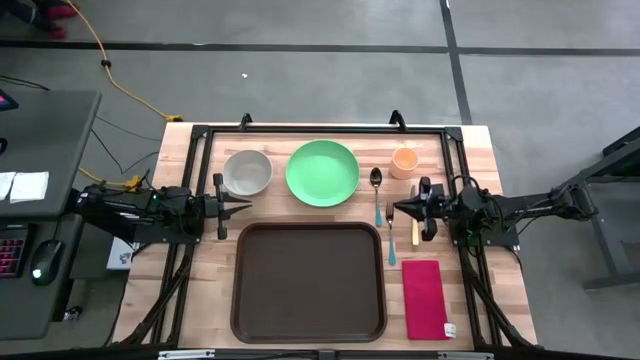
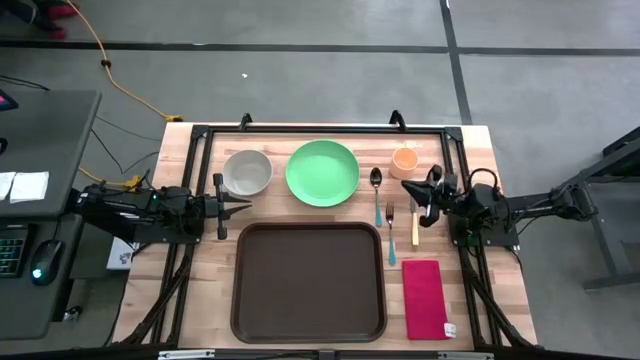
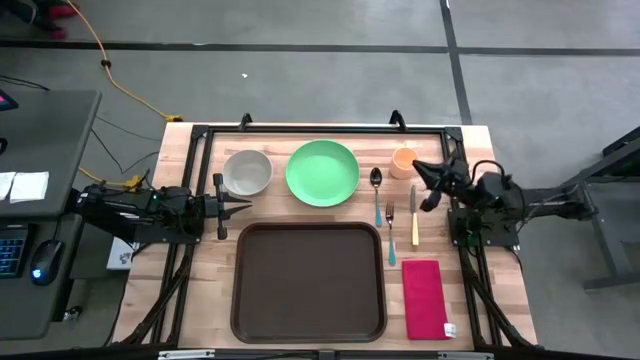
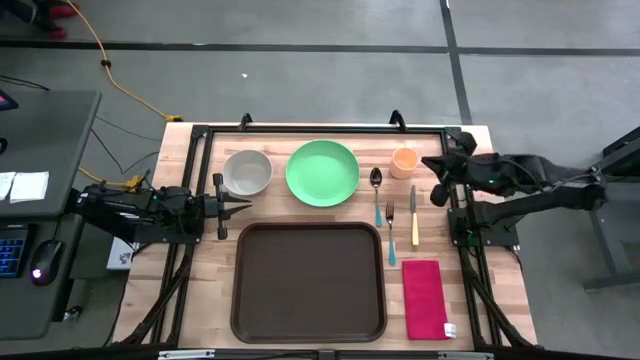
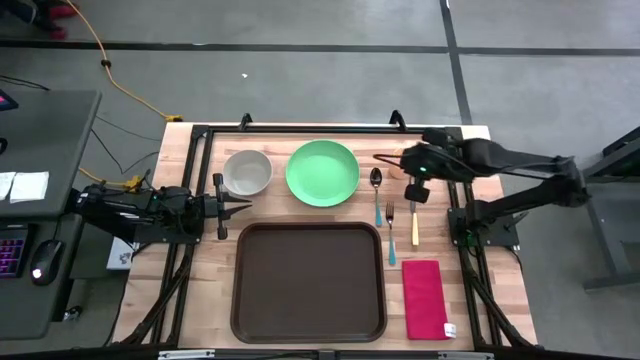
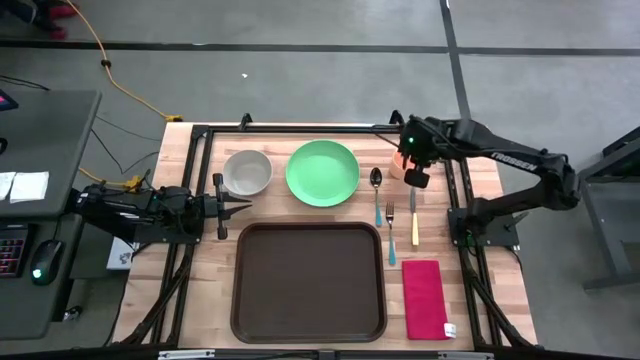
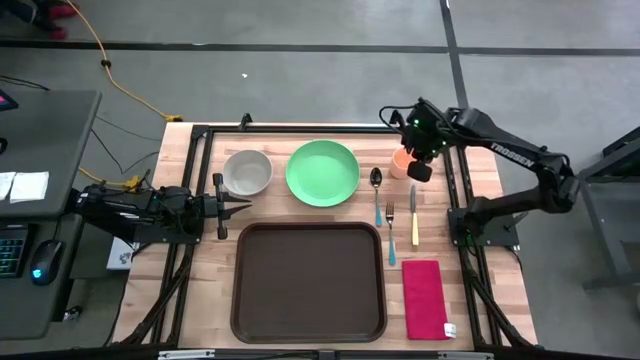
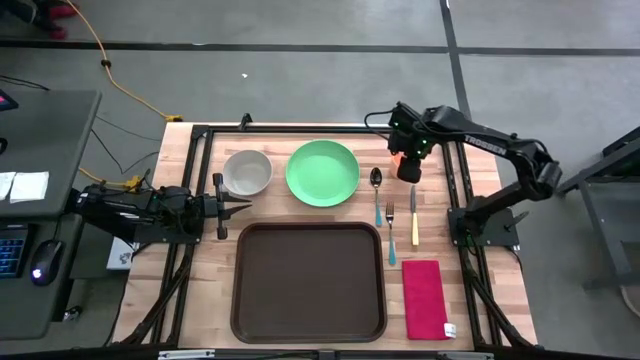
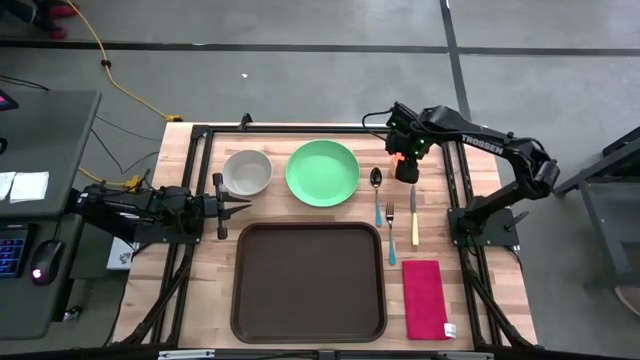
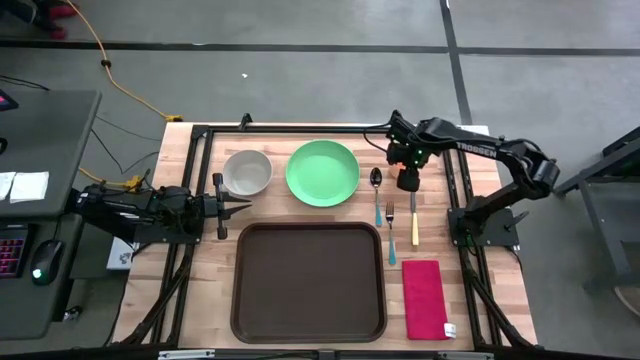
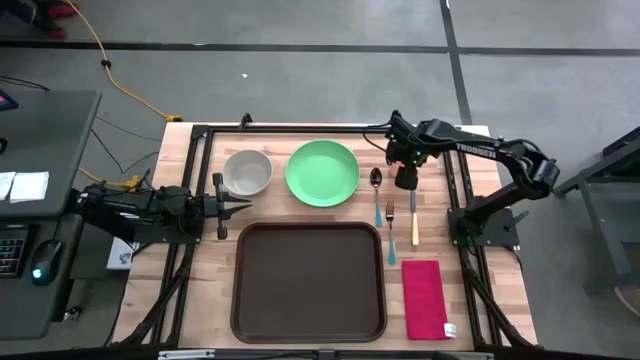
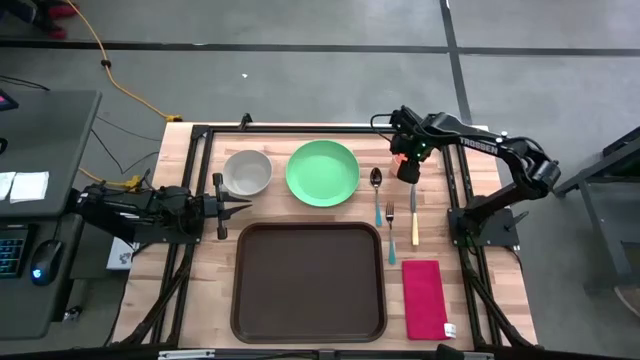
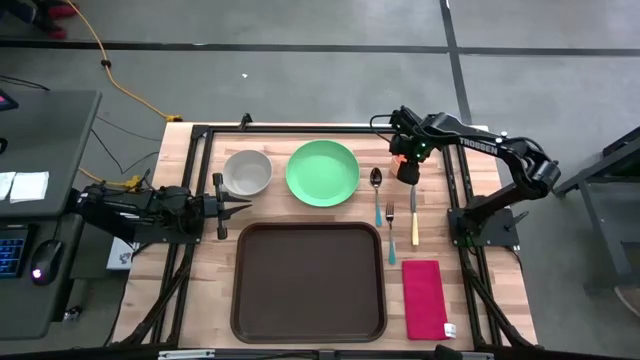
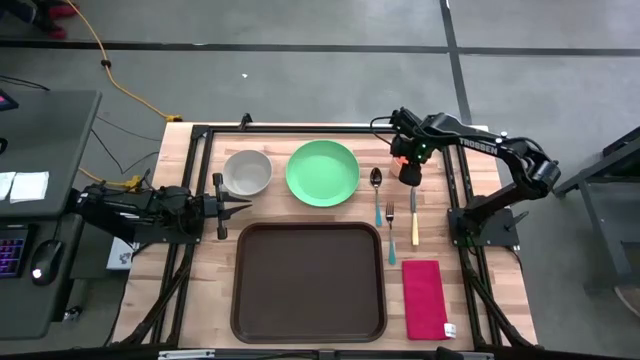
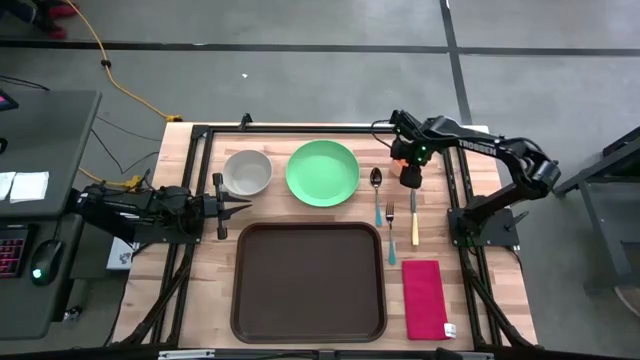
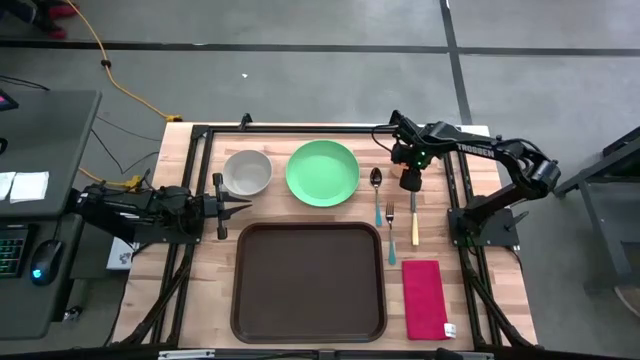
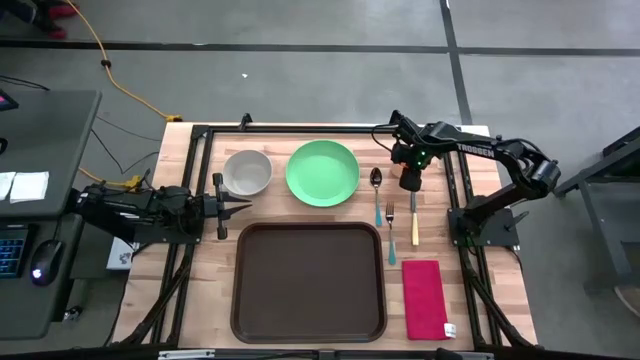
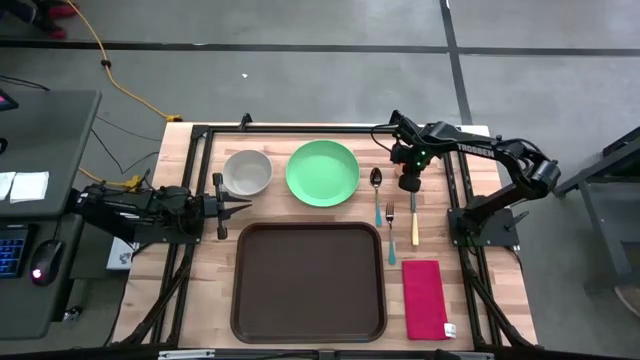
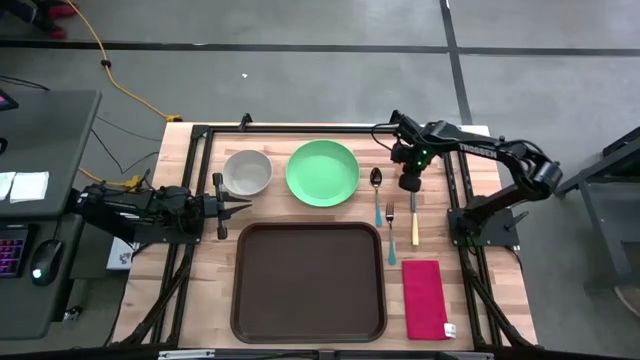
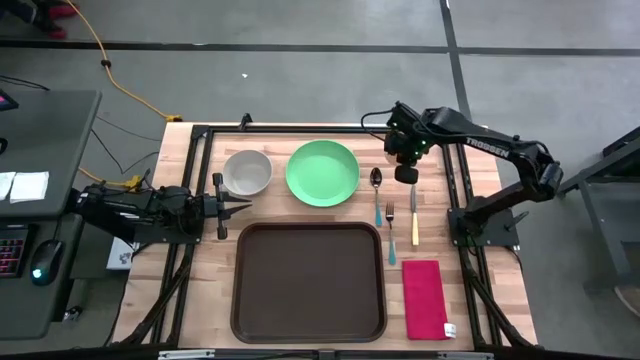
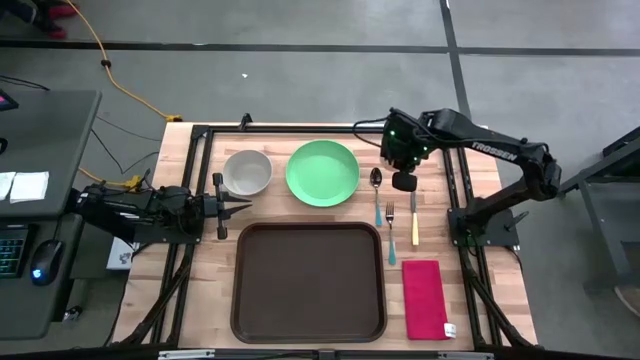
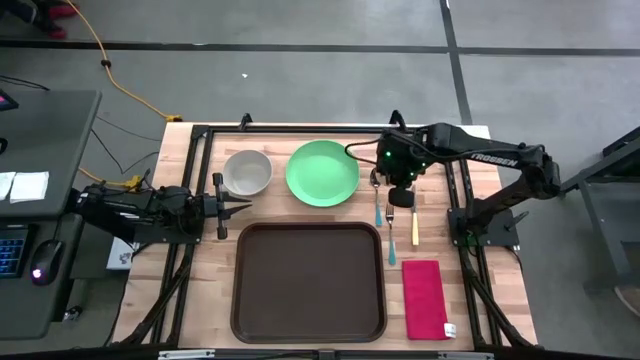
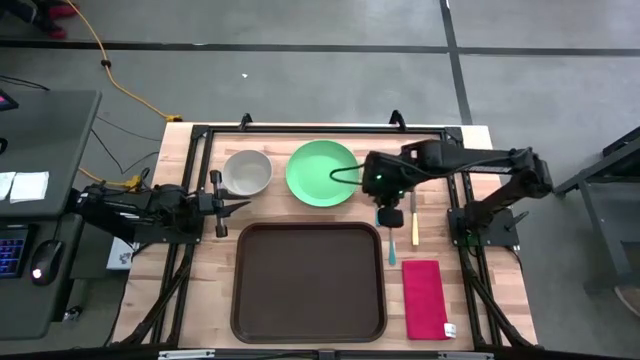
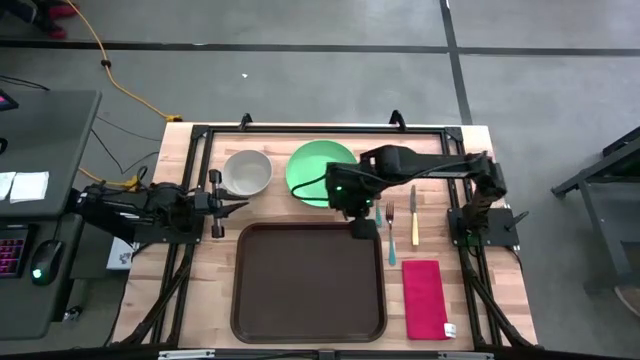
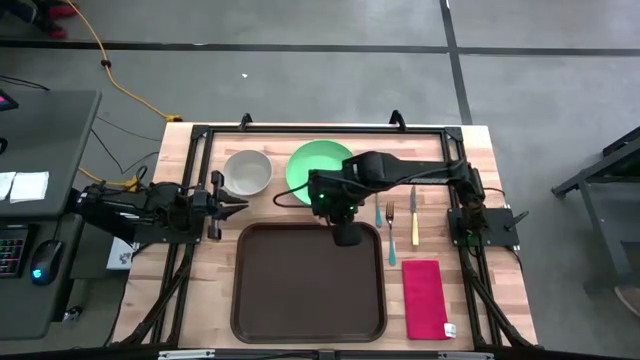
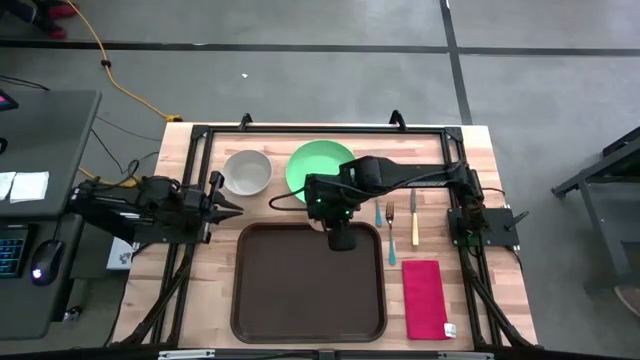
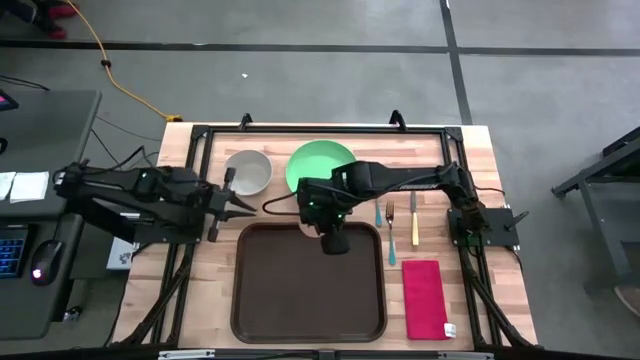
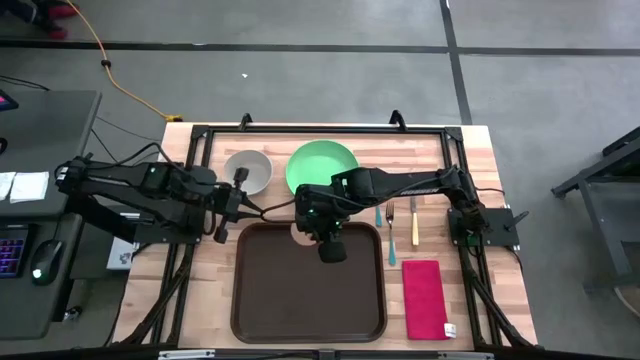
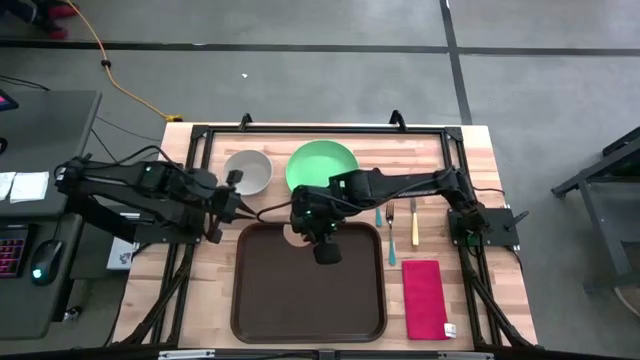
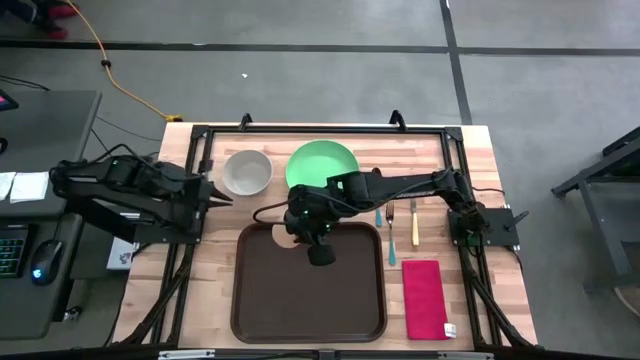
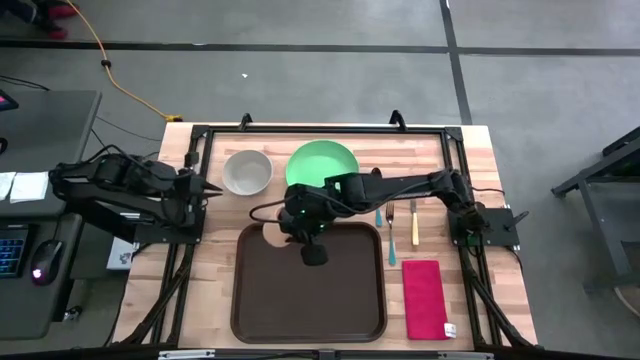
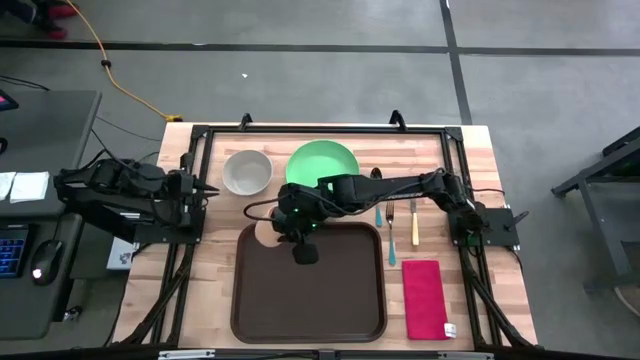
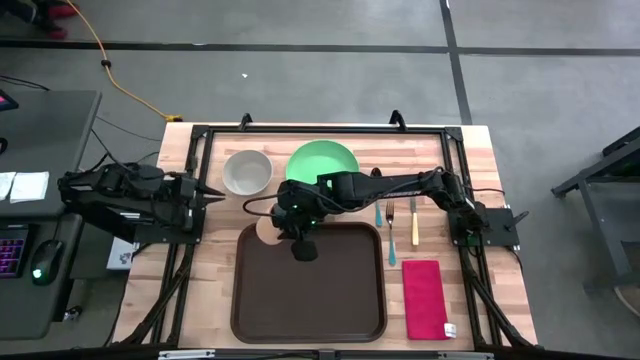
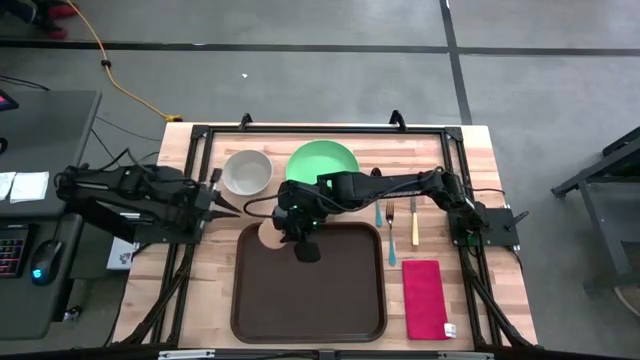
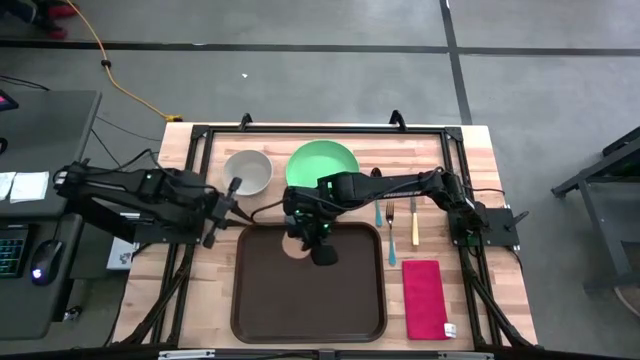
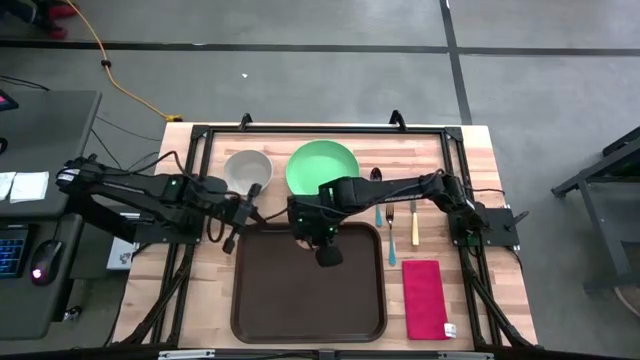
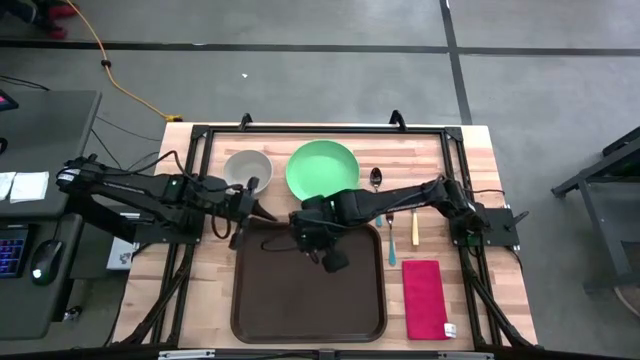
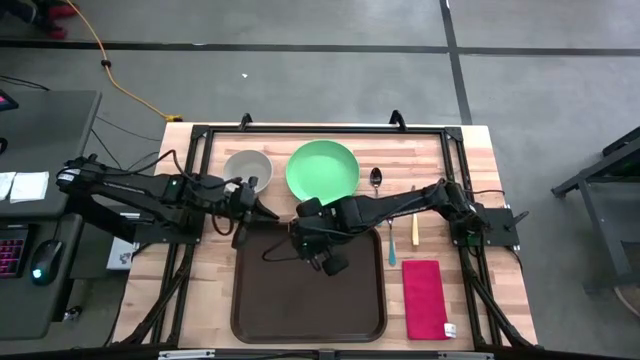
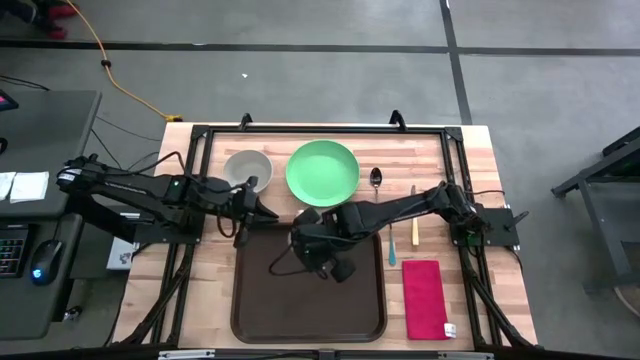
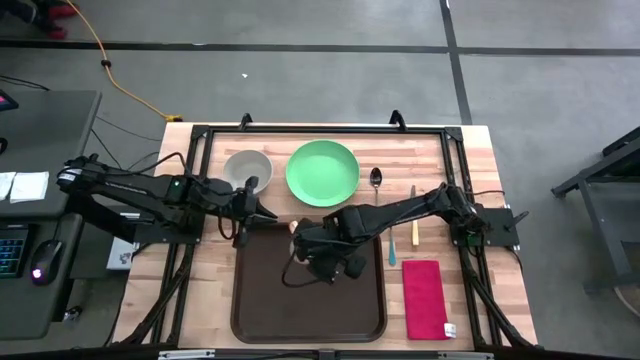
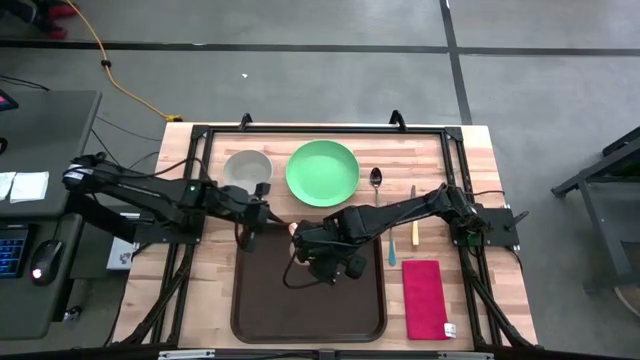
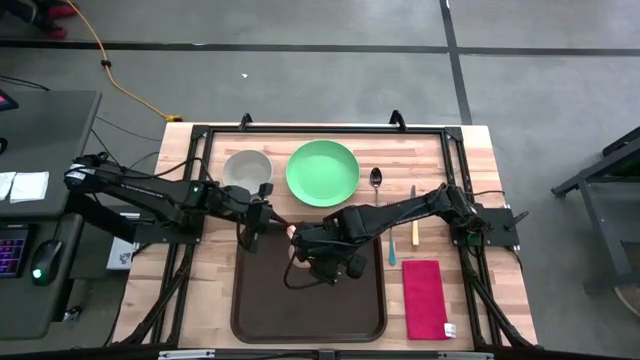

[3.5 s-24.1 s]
Task: Set up tray
Put the orange cup on the brown serving tray
